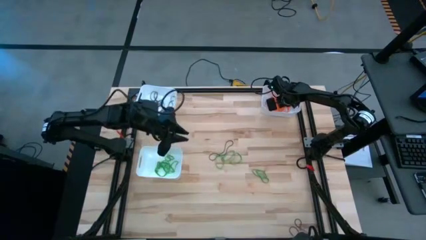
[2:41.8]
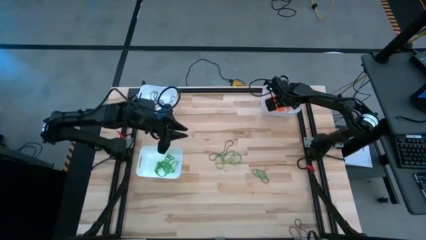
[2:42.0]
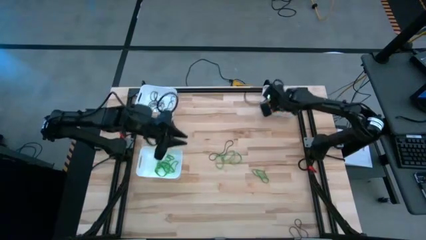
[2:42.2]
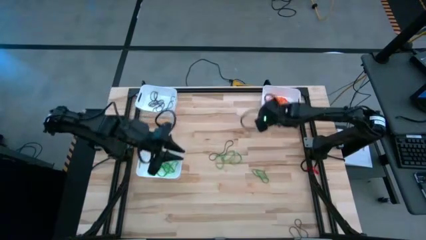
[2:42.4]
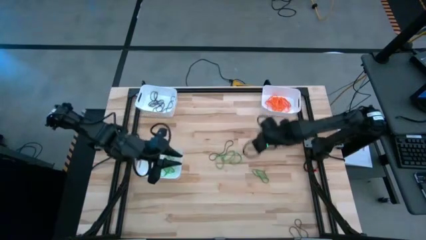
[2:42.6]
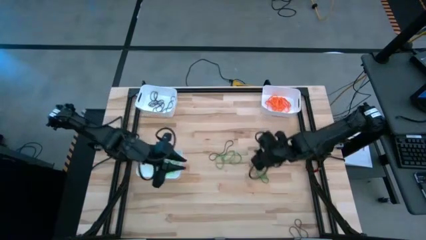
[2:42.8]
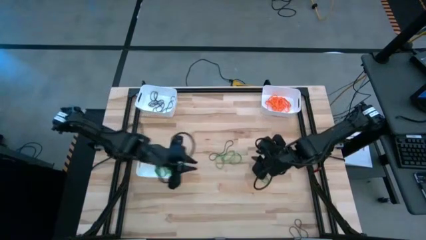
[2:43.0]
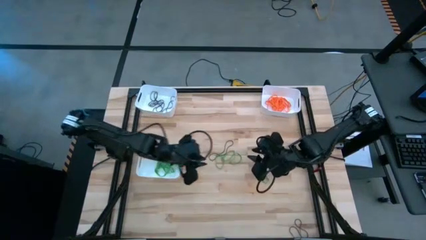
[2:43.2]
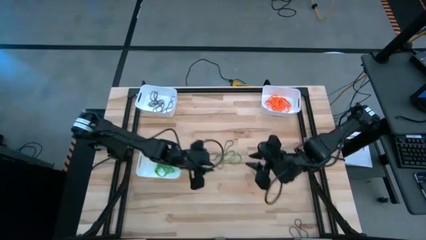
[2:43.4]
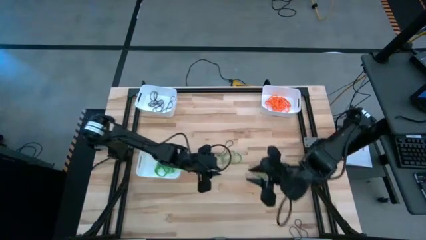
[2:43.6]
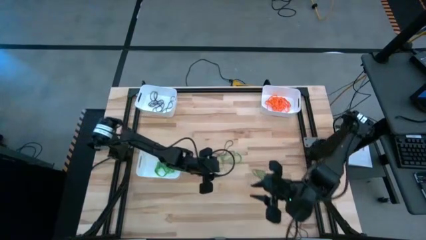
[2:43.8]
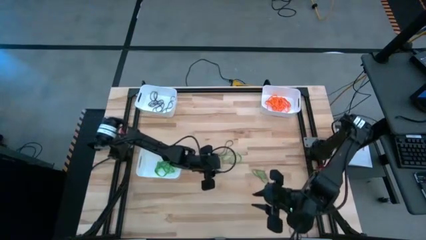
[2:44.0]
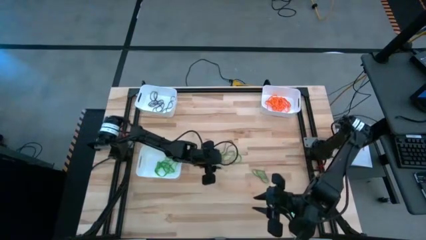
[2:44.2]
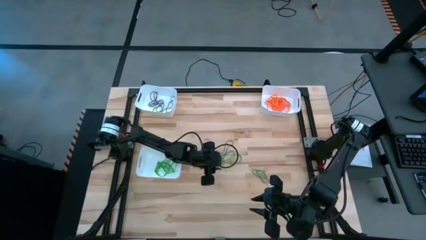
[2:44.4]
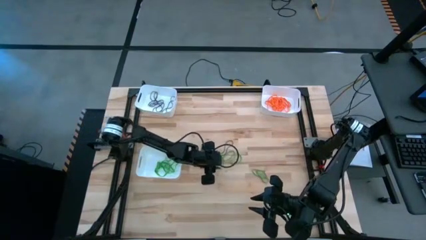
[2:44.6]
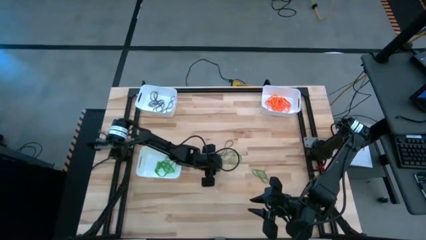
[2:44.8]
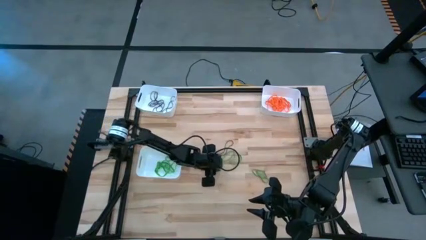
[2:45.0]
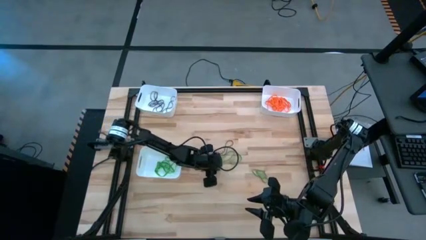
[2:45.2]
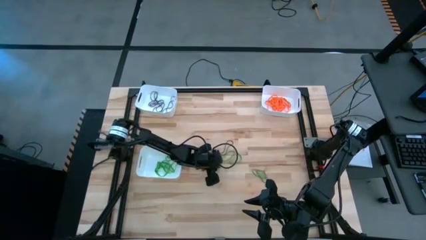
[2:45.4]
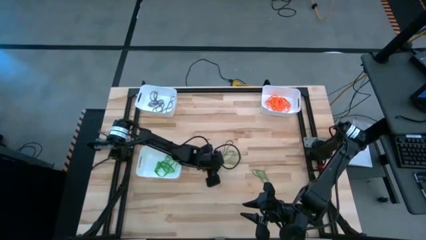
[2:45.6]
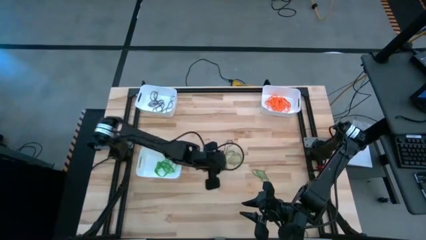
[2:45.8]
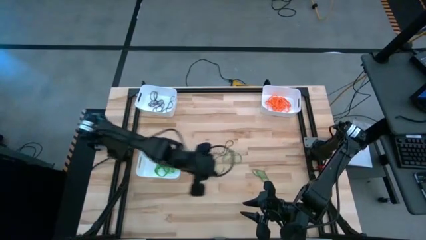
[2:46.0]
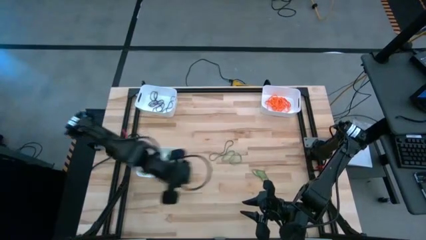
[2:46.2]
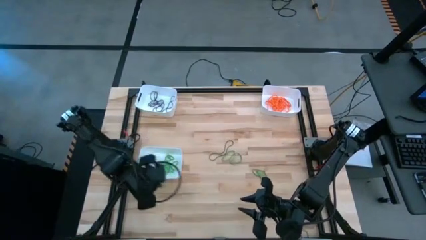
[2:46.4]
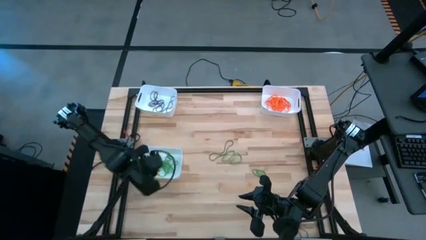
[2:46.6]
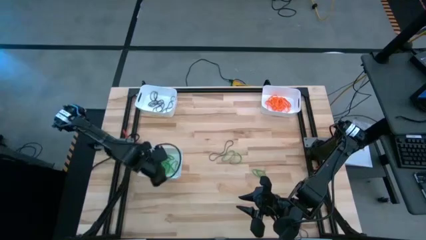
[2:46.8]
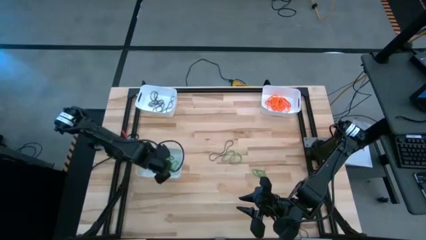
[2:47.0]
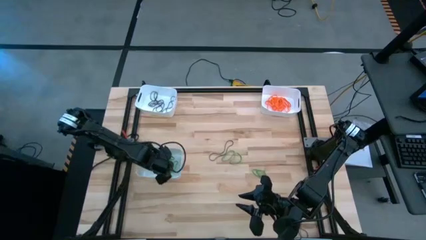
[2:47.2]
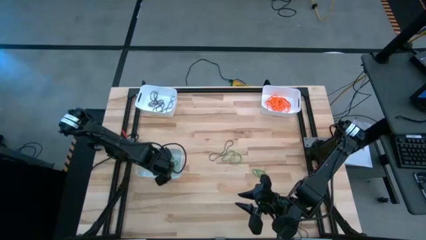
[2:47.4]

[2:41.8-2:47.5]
Task: Sort rubber bands into baskets
Put the green rubber band into the bottom white bin

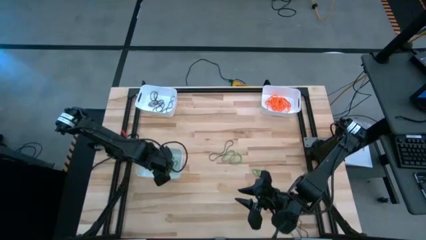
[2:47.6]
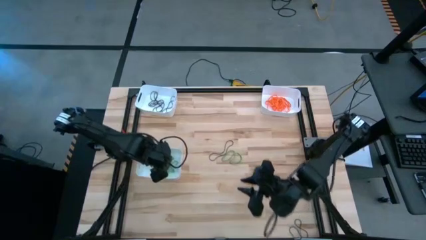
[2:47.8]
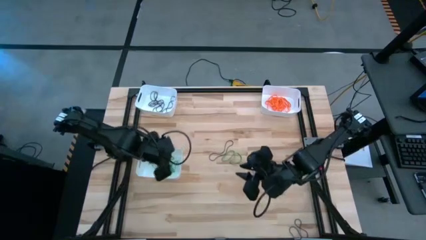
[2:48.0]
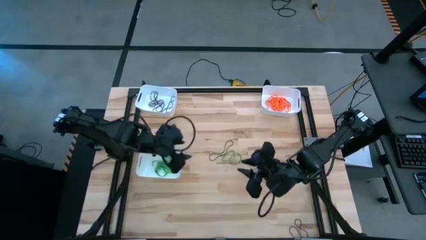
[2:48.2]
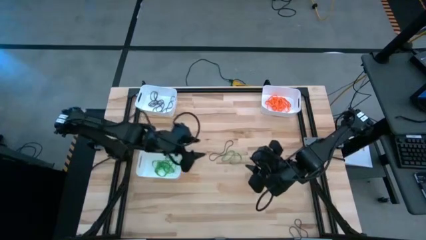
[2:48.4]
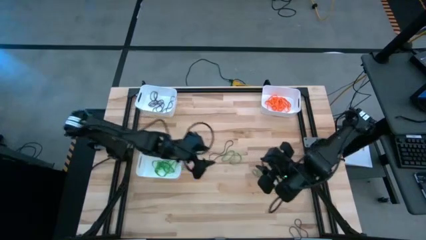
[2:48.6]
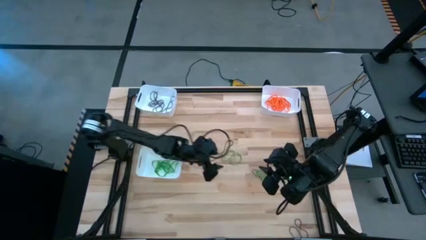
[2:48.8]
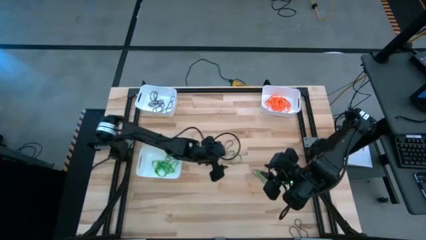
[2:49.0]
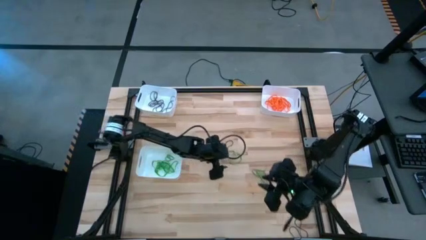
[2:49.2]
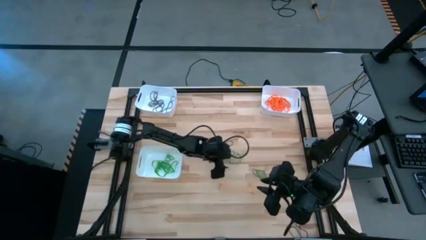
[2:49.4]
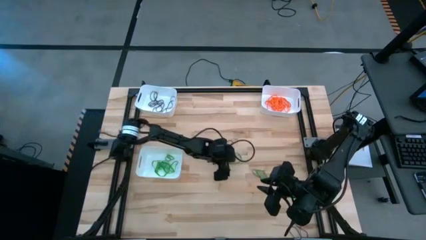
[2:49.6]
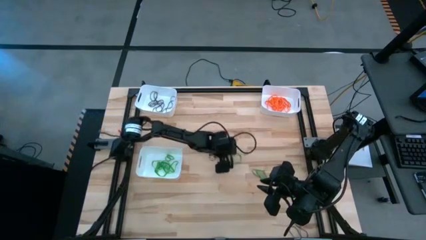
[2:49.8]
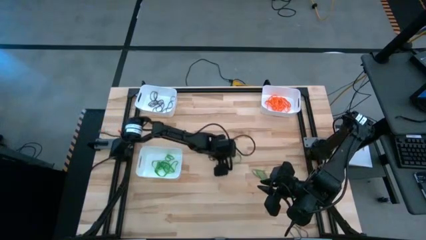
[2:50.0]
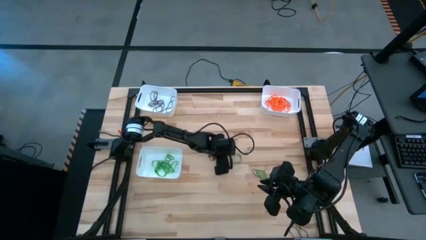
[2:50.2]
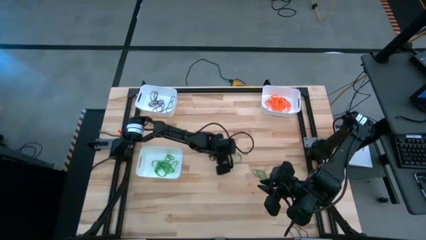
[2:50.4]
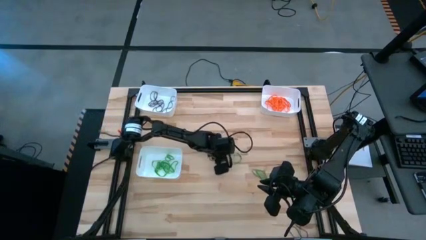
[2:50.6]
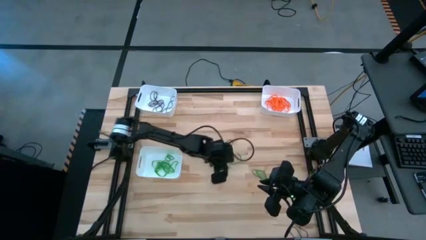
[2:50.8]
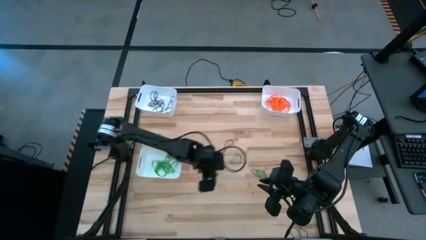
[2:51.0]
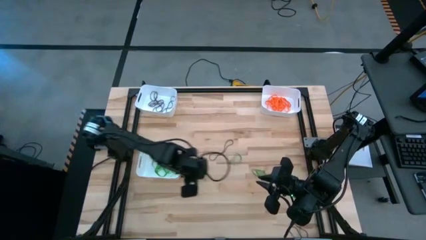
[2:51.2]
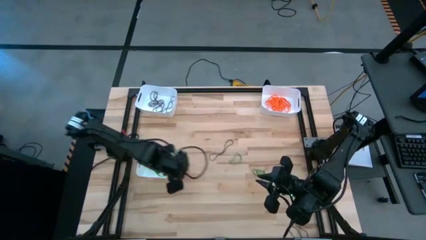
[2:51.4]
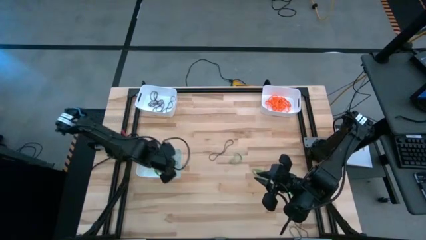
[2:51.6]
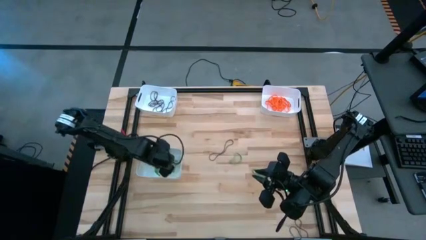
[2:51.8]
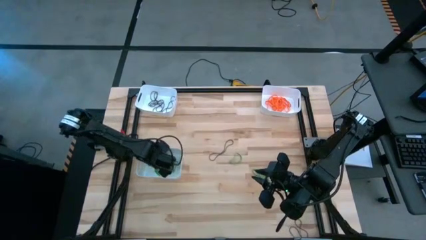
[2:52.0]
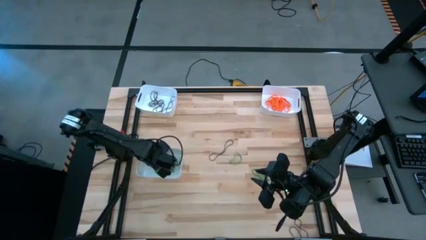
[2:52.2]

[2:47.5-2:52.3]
Put the green rubber band into the bottom white bin

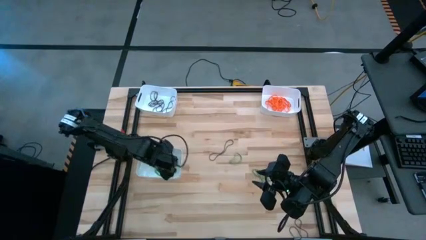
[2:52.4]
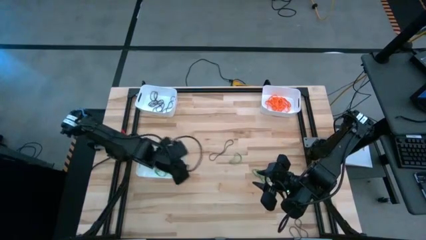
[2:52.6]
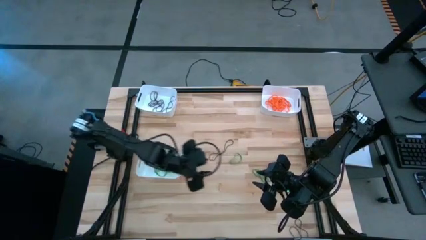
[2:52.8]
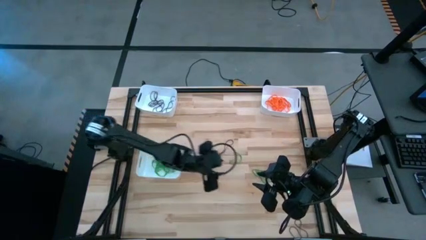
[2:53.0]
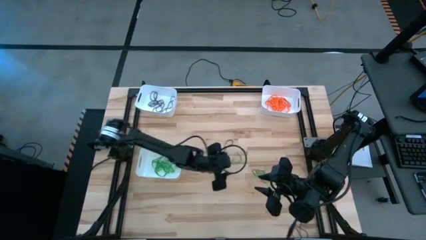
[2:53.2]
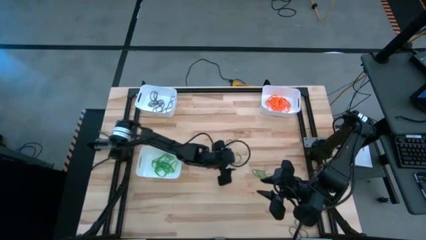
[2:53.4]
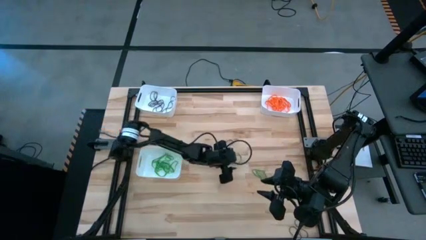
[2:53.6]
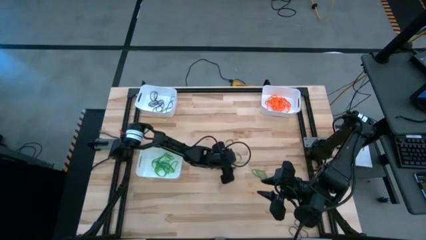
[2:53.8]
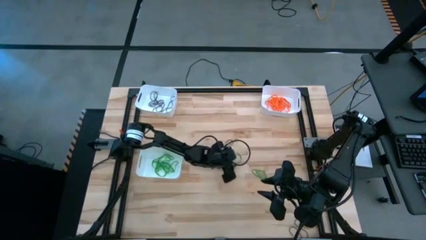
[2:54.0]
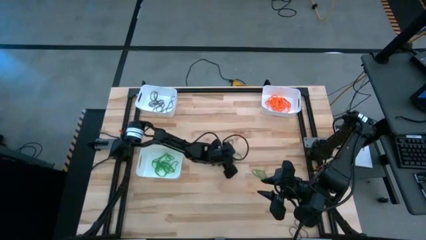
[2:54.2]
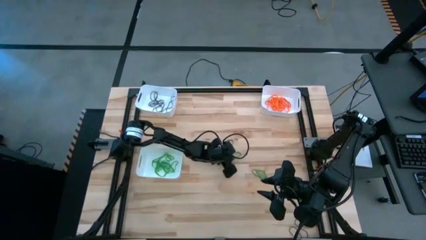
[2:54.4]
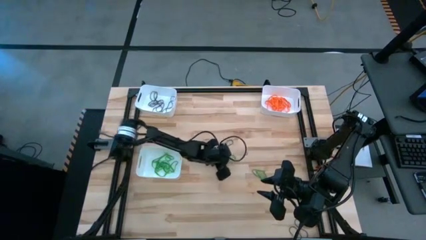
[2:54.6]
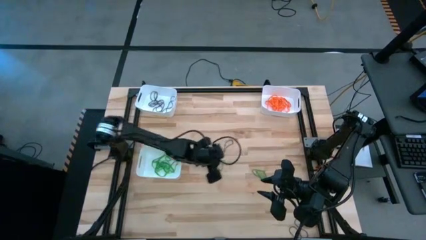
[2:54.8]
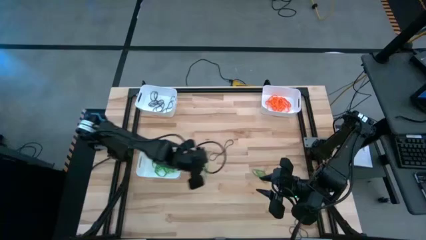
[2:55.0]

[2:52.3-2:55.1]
Put the green rubber band into the bottom white bin

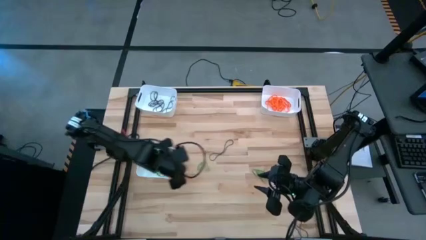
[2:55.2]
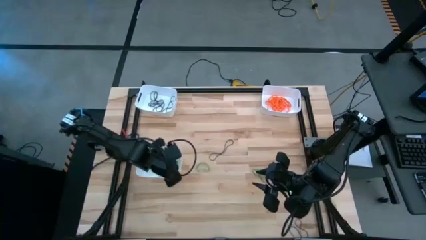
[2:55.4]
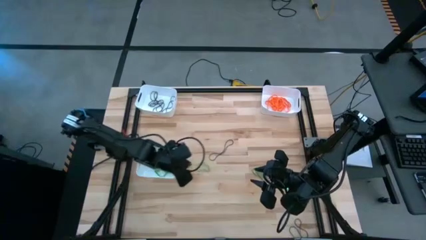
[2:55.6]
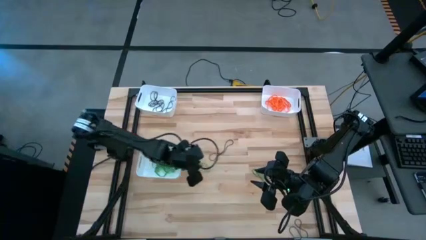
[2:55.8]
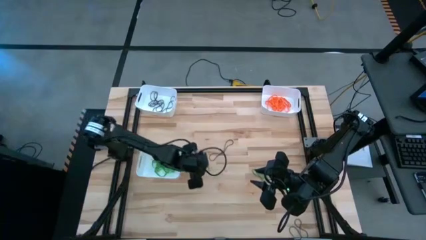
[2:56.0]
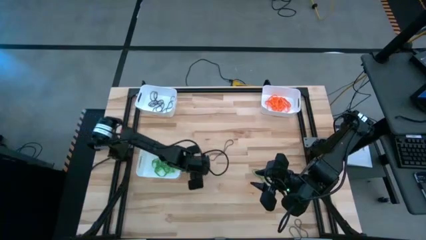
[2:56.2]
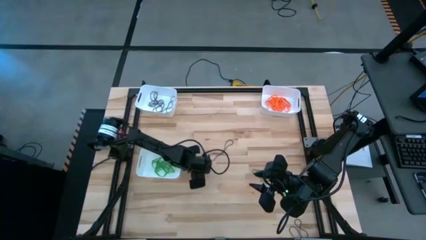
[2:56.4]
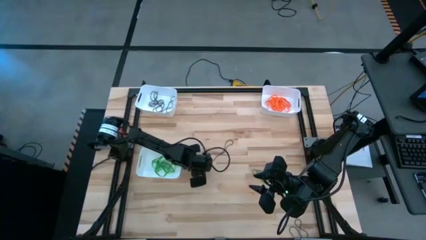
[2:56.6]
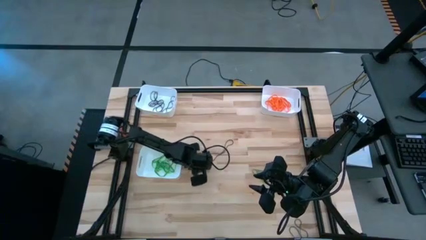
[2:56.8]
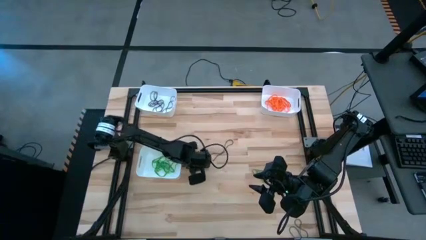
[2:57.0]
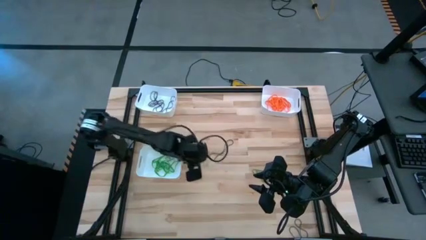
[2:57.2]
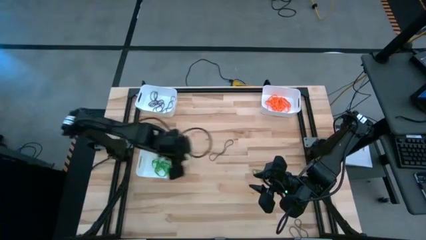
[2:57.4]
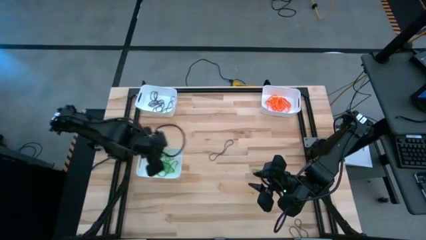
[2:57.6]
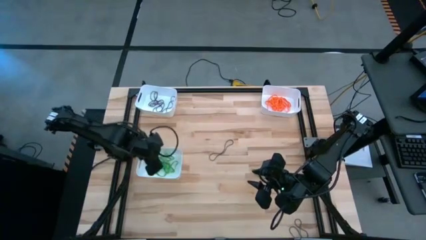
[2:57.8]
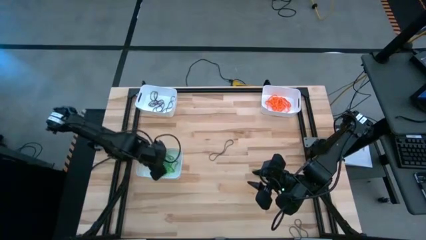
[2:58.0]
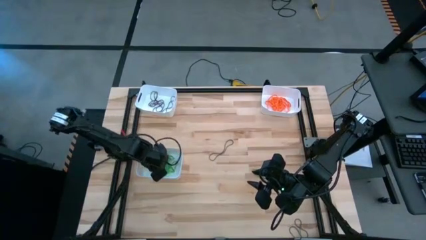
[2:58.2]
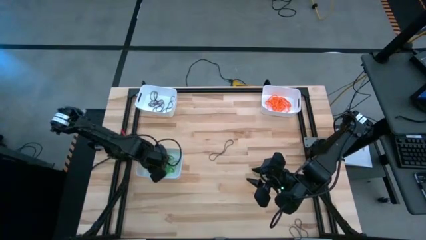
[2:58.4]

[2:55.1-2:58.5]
Put the green rubber band into the bottom white bin
